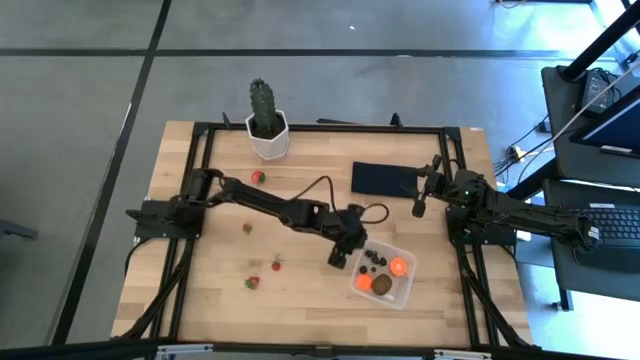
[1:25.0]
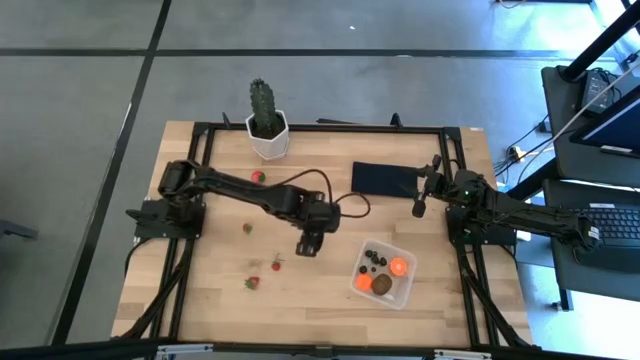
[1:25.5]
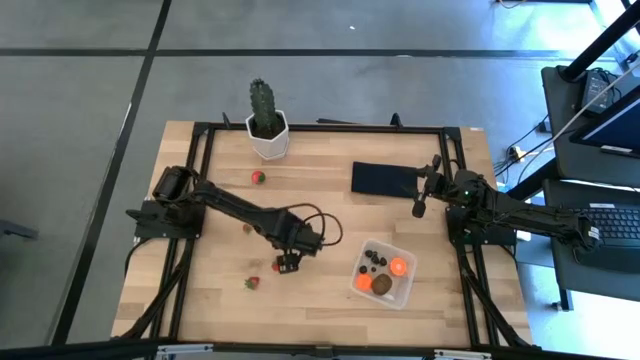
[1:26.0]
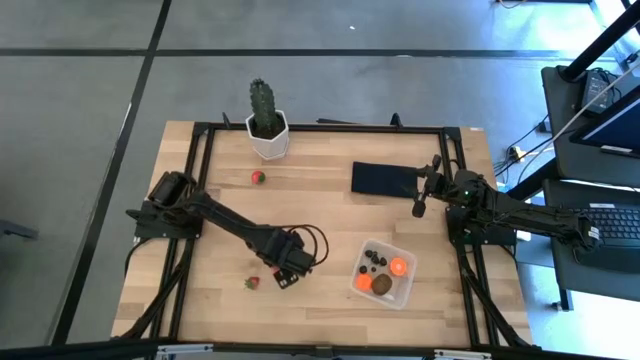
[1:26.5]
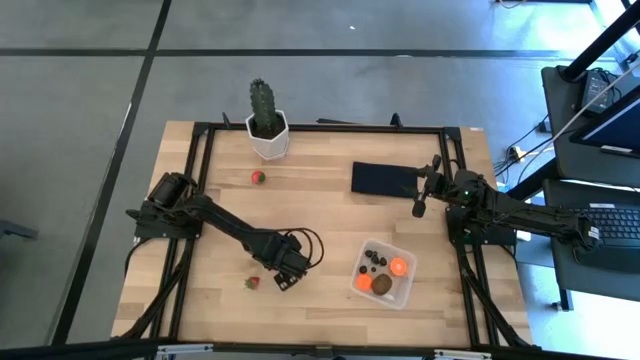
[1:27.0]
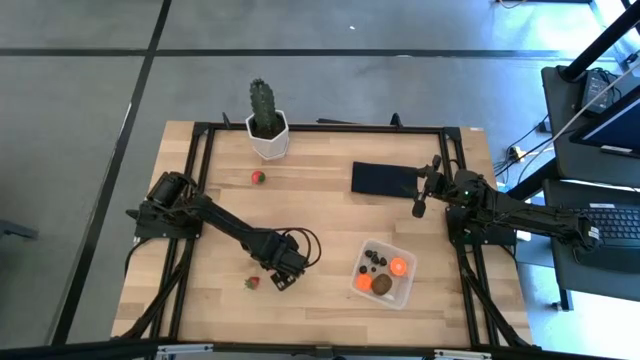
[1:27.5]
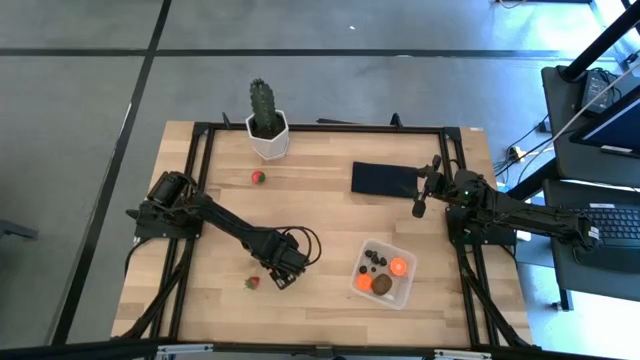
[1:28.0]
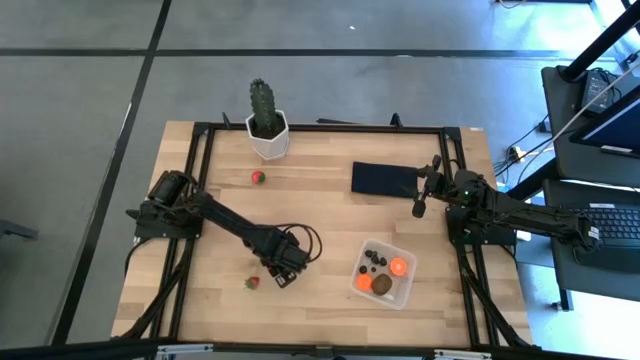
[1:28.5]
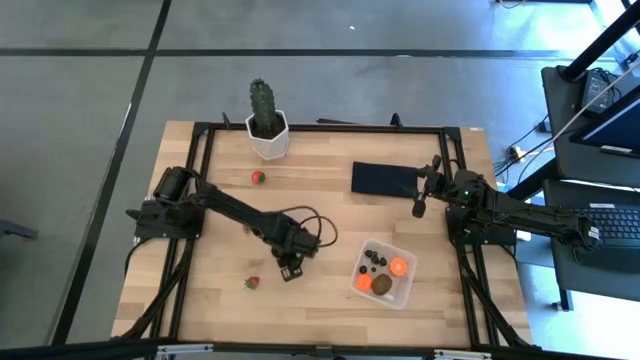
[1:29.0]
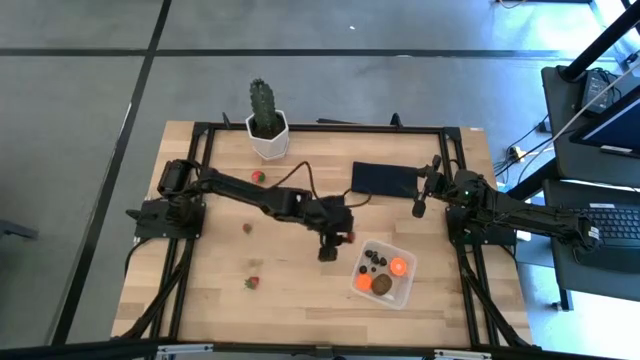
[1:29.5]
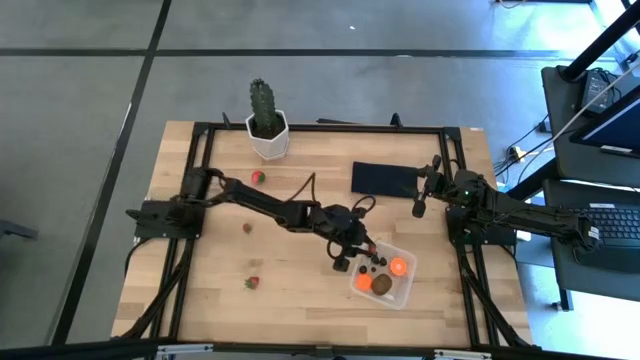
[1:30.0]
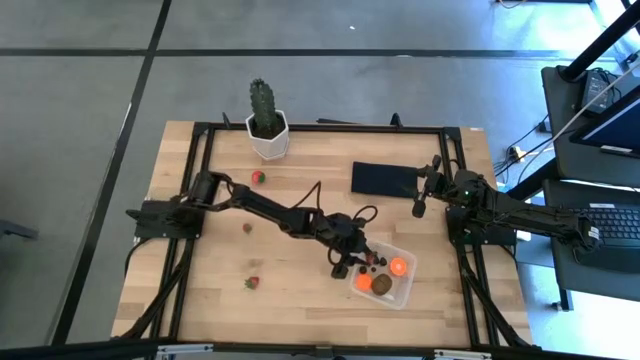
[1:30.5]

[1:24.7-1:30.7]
Task: Pick and placing Produce into tupperware
Put the strawberry into the transparent bin

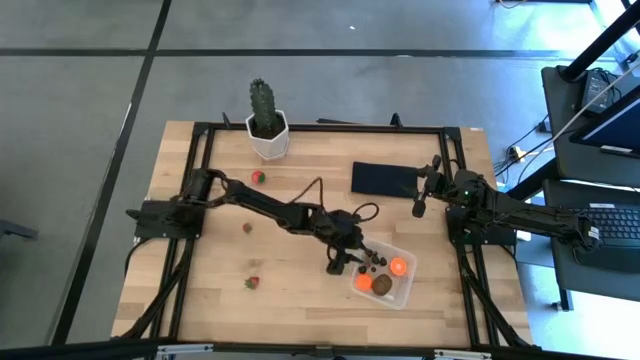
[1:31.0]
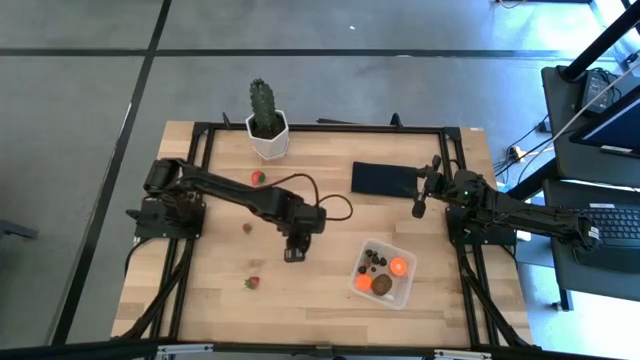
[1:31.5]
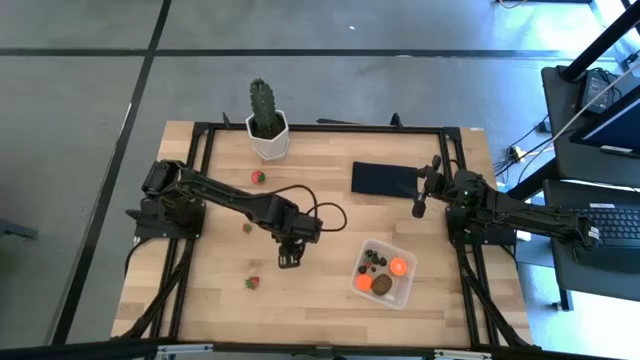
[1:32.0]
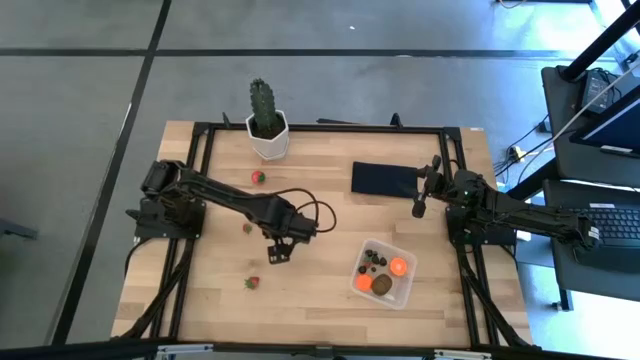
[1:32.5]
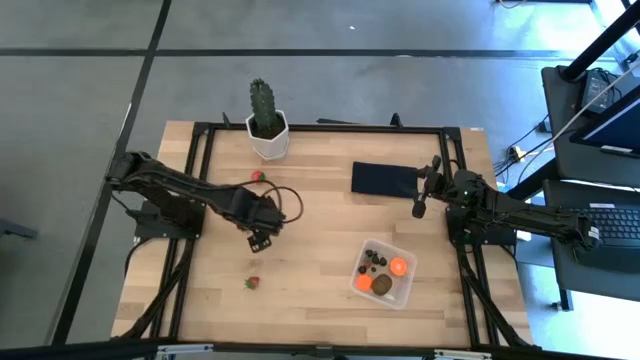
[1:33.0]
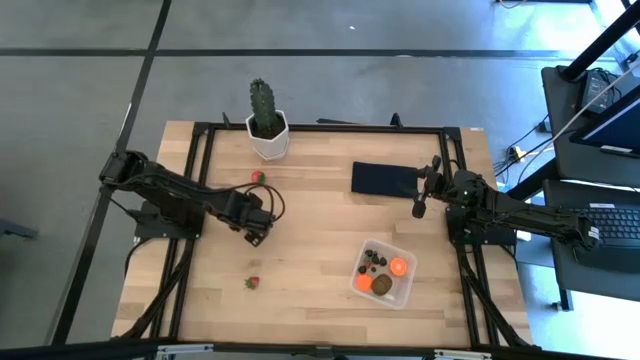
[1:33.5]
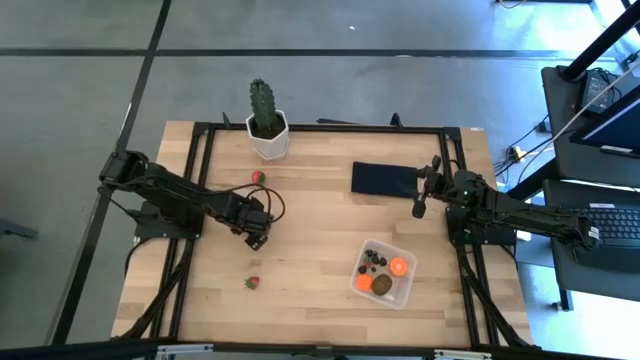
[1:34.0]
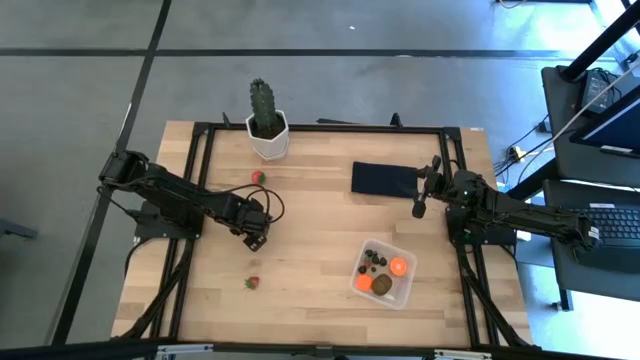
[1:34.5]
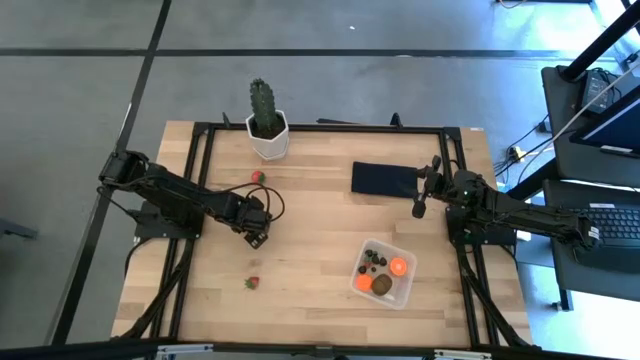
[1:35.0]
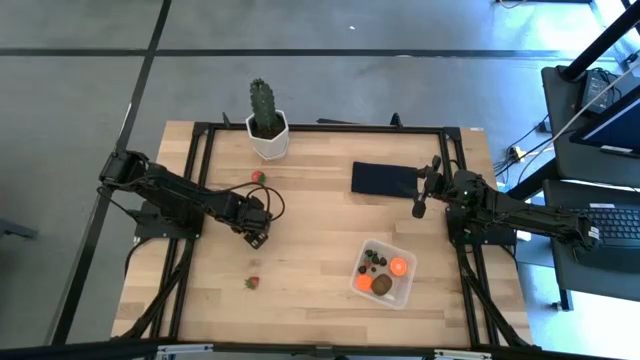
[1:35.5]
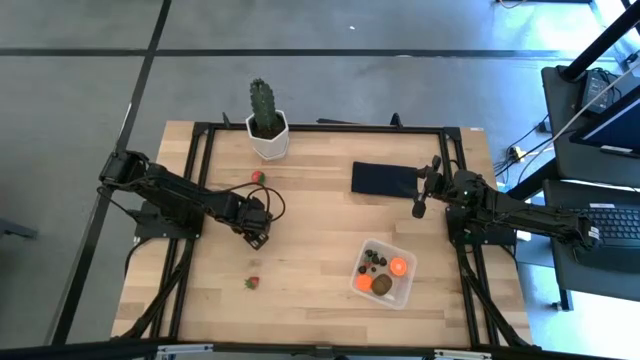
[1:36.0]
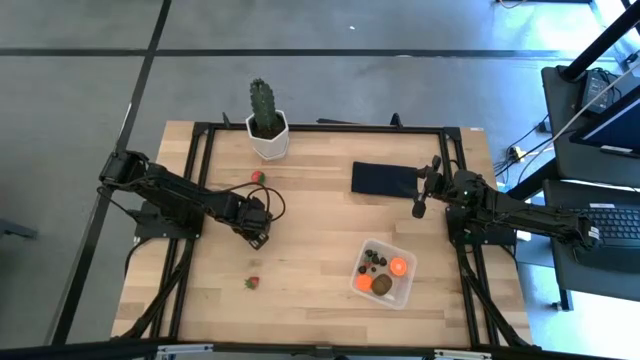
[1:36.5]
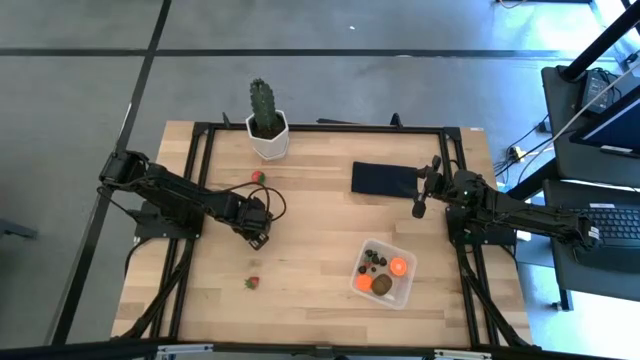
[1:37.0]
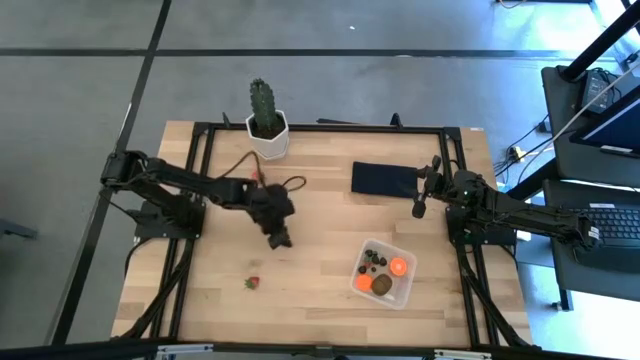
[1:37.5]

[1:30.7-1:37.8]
Put the middle strawberry into the transparent bin

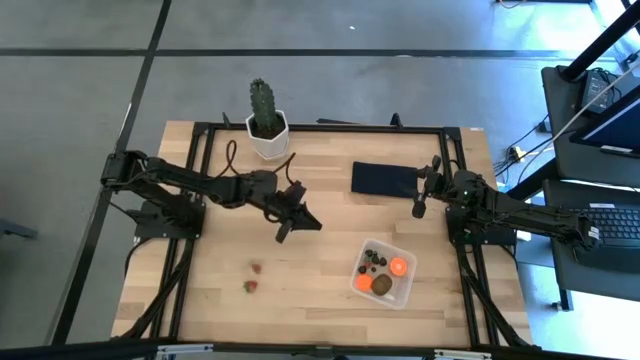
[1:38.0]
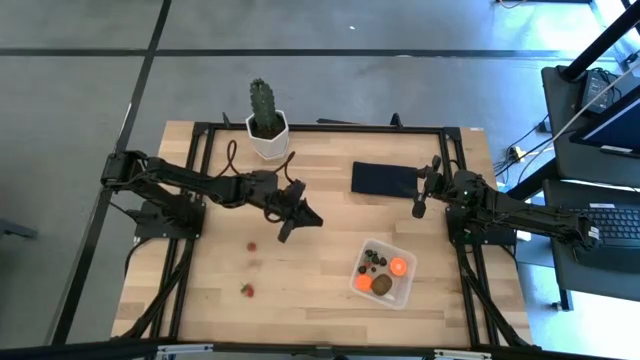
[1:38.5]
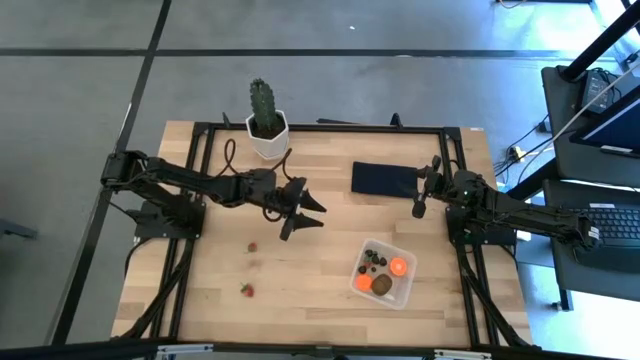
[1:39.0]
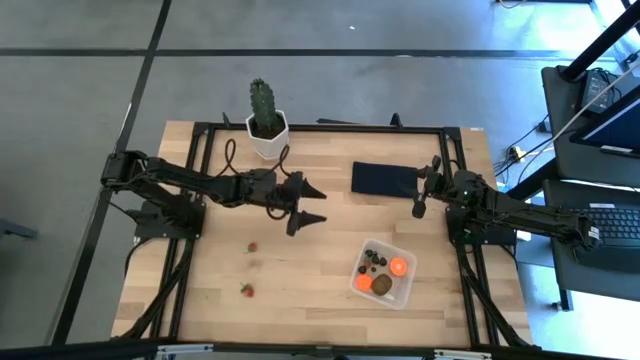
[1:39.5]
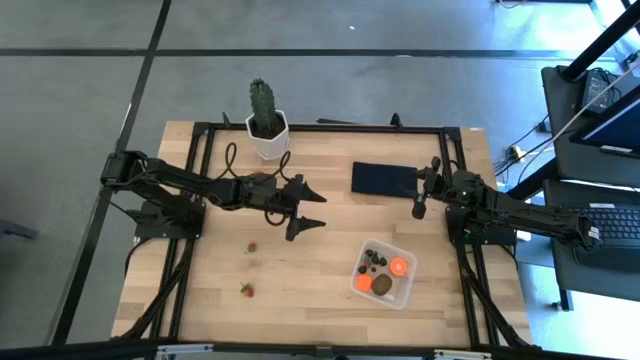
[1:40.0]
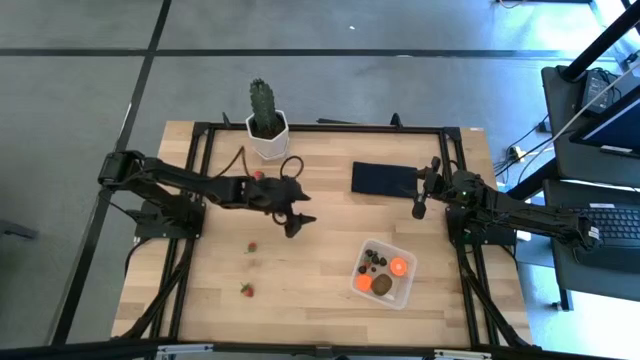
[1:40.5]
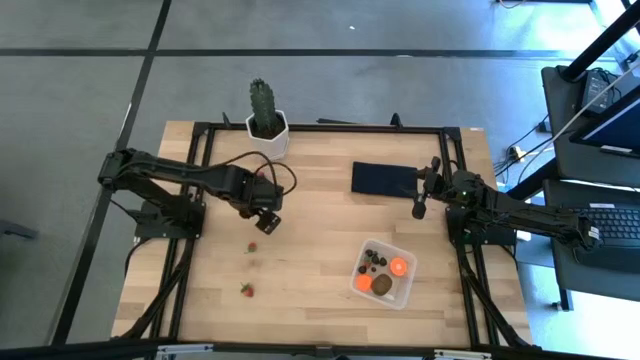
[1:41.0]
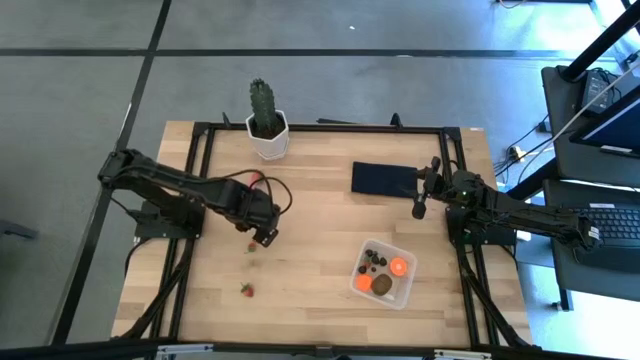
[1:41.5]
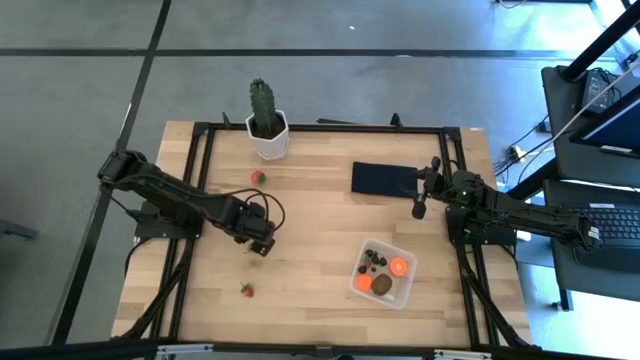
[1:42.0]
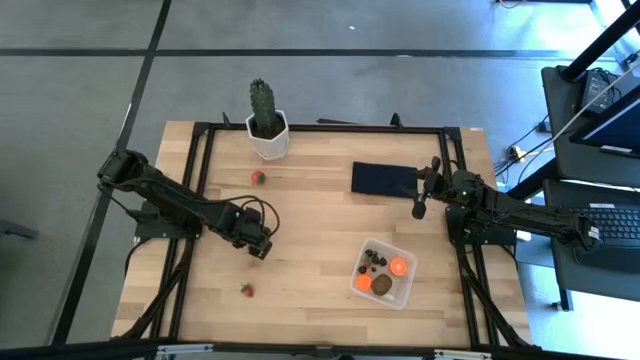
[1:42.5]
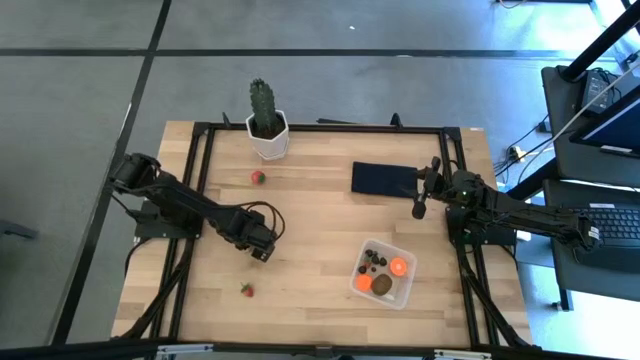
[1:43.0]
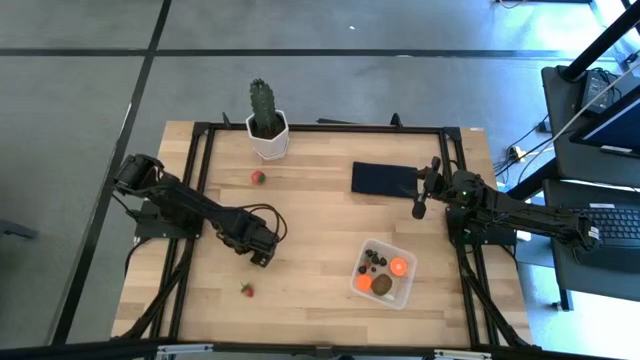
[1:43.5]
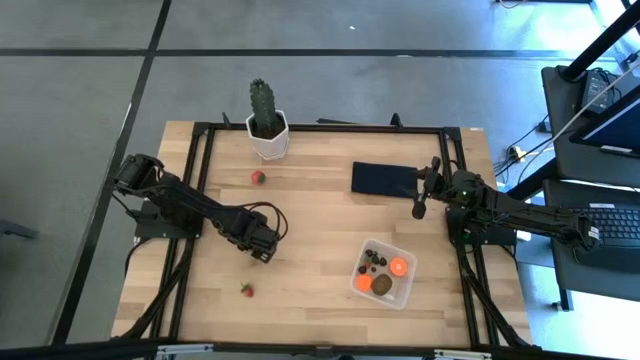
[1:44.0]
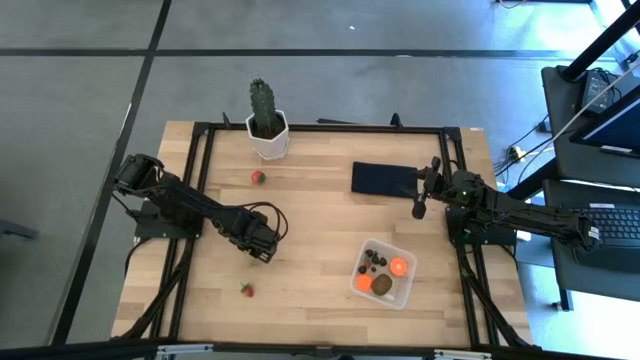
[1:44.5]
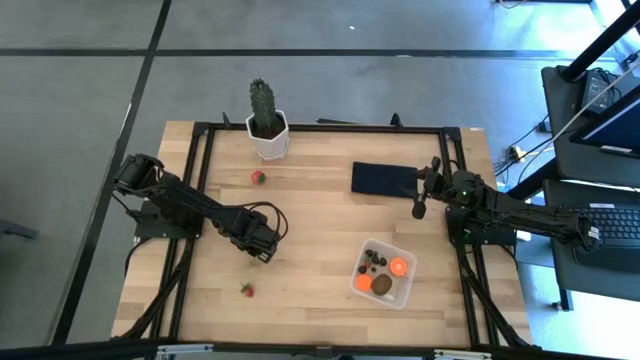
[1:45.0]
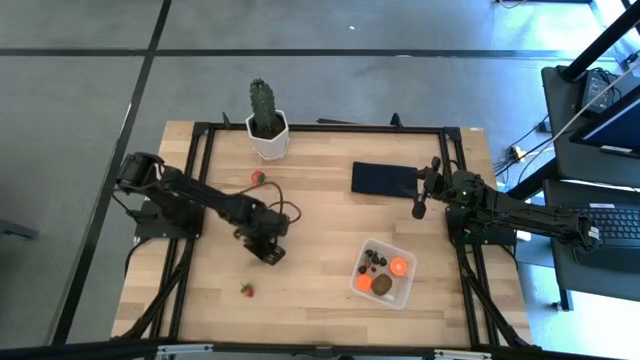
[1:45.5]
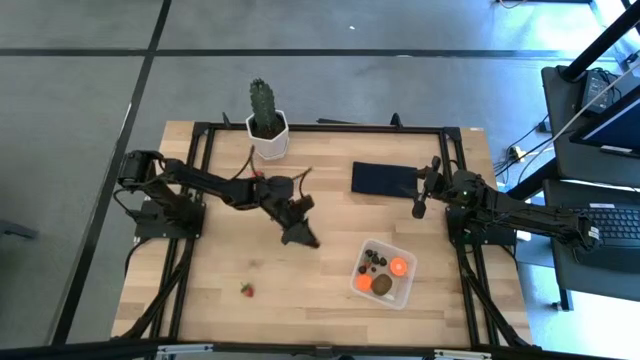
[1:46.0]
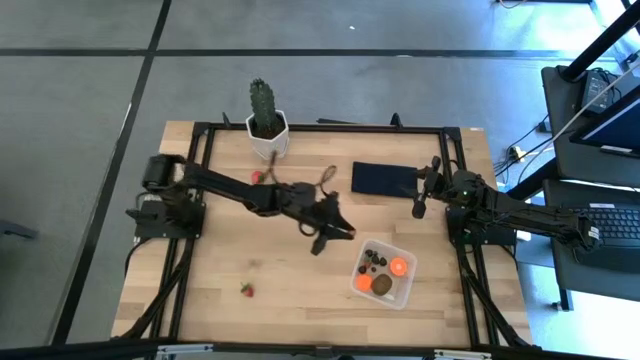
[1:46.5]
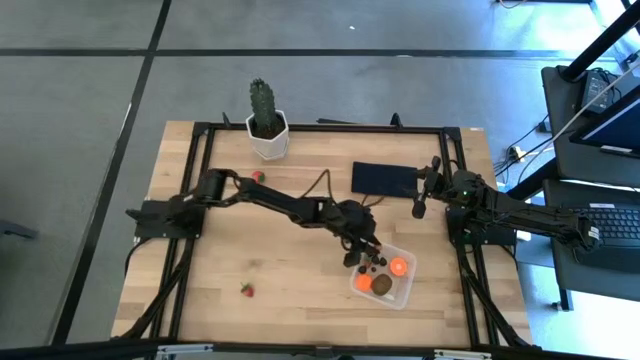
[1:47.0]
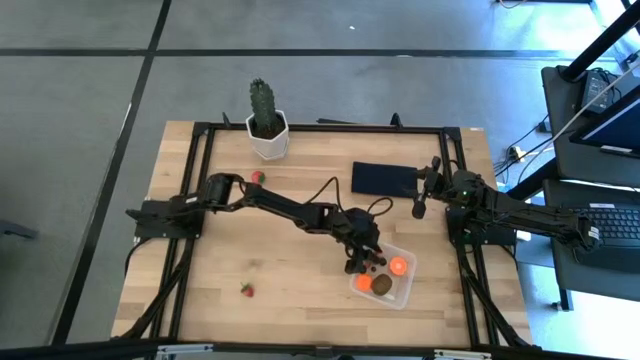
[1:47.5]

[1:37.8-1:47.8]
Put the middle strawberry into the transparent bin
